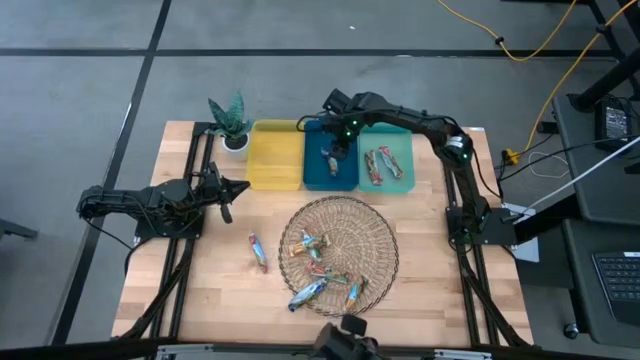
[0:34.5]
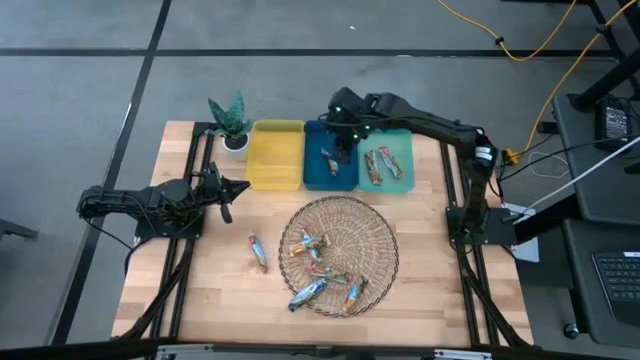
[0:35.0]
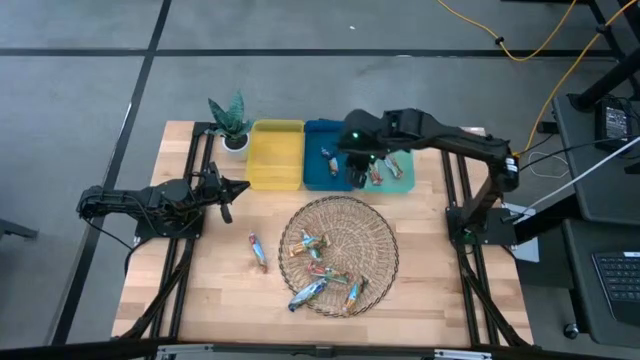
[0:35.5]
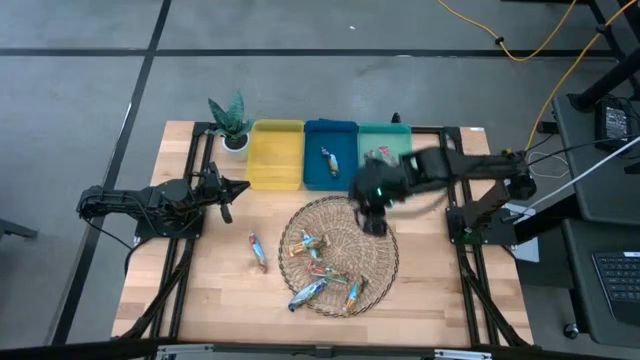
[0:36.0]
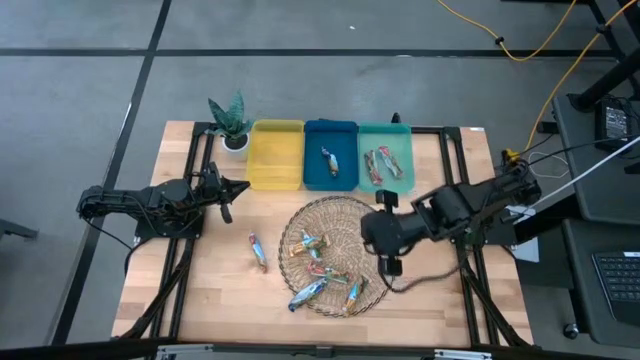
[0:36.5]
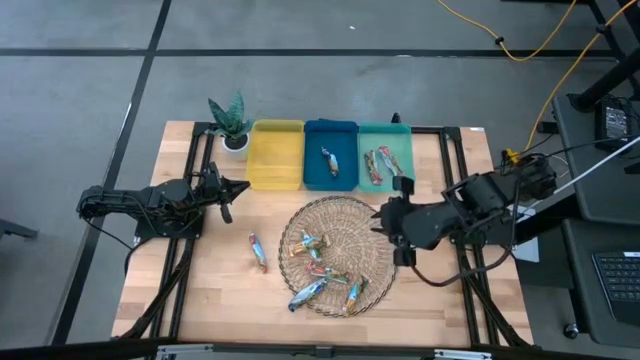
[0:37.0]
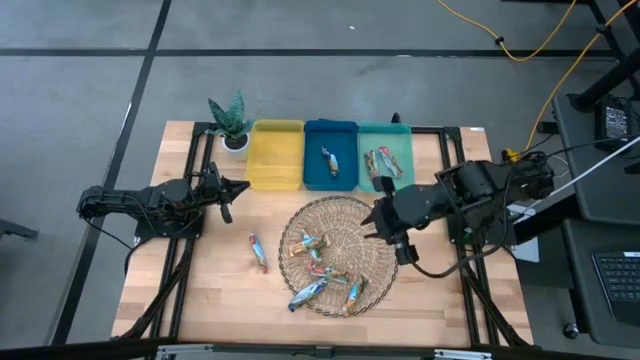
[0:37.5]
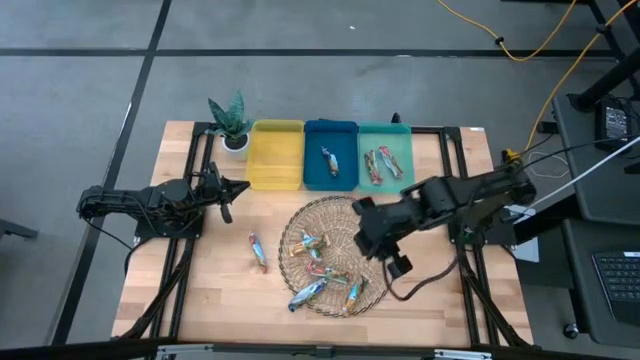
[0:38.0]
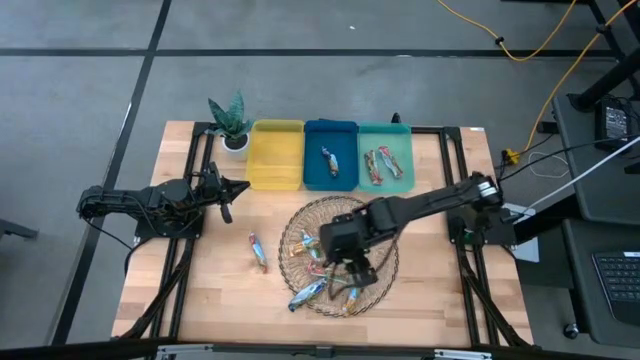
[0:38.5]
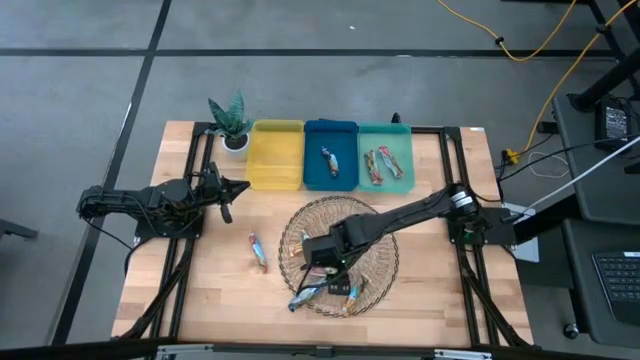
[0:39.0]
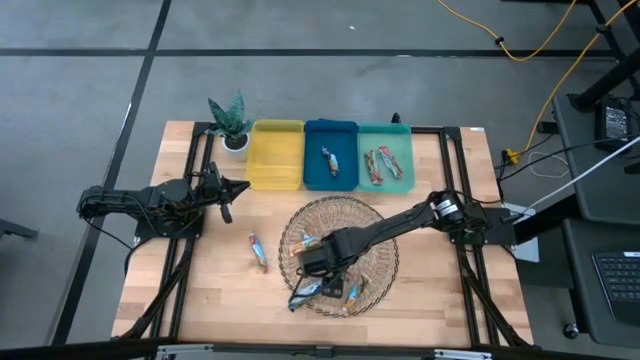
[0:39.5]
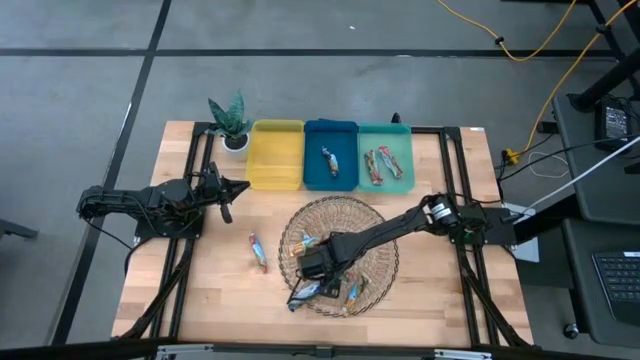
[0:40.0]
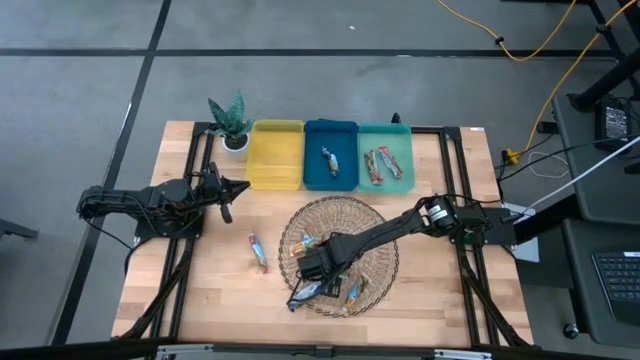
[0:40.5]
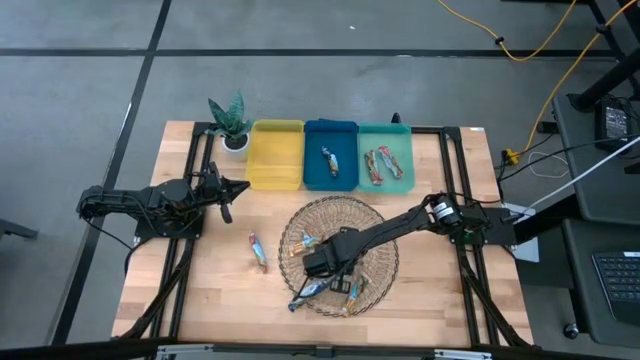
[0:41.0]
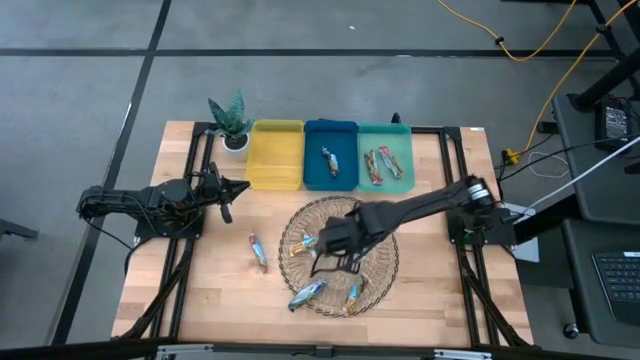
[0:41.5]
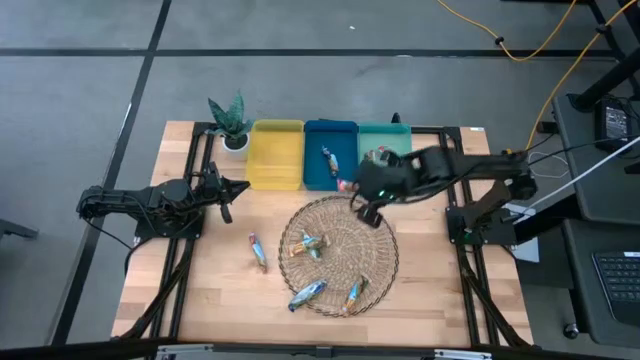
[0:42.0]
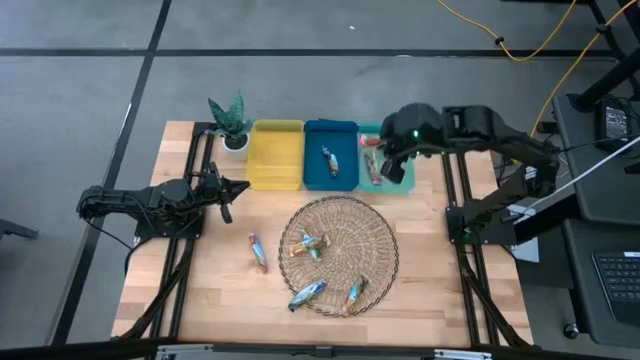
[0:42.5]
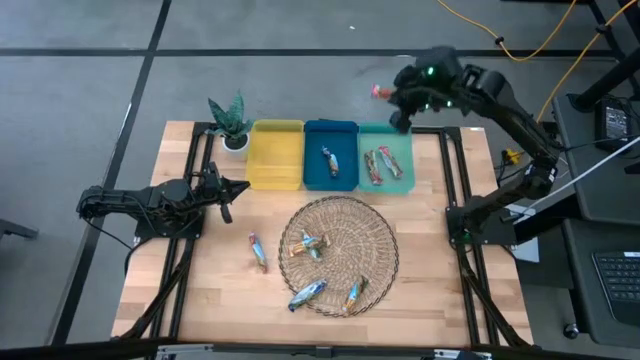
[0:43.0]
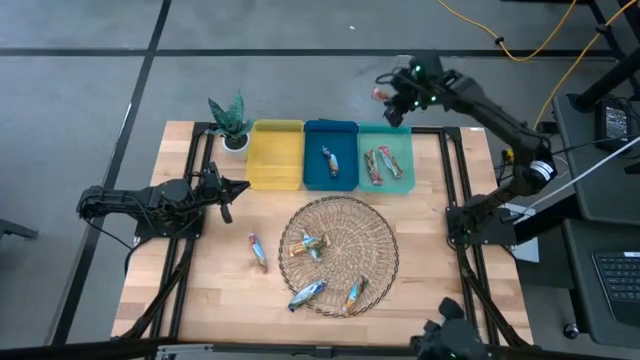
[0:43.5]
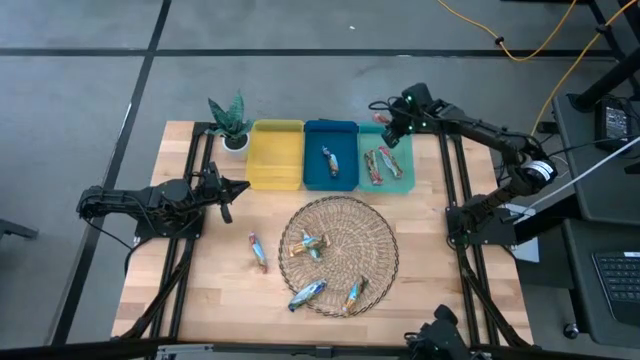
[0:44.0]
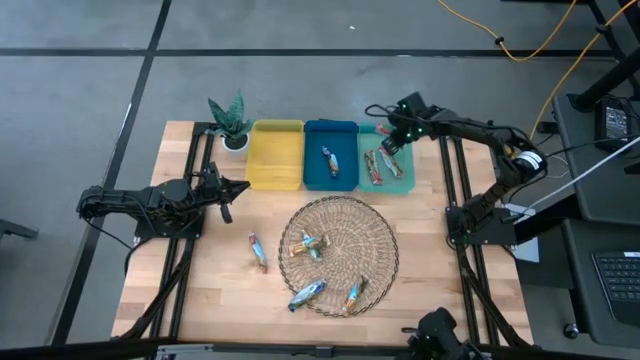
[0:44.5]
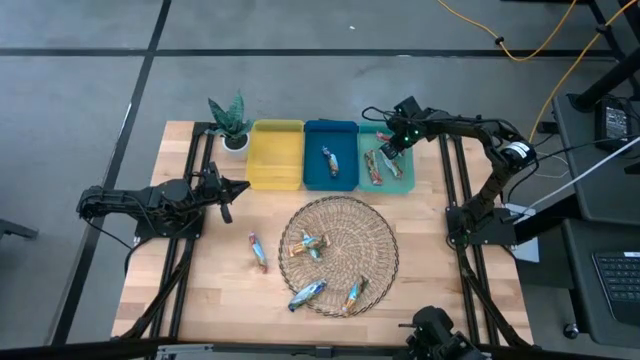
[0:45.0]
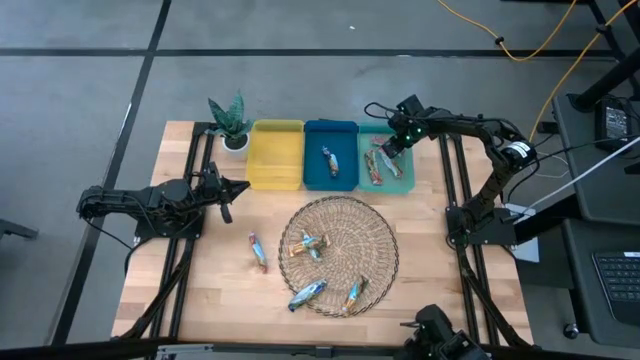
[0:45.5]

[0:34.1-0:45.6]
Task: Pick and place Granola Bars by type
Put the red granola bar into the green bin

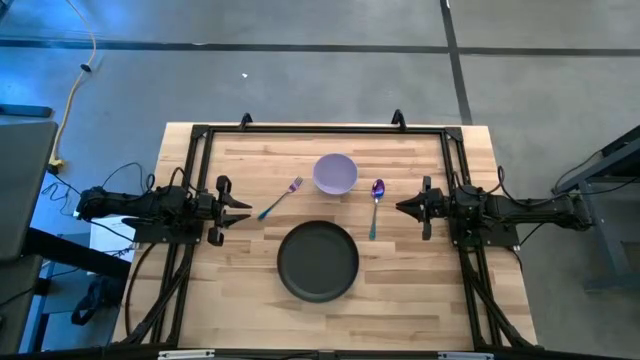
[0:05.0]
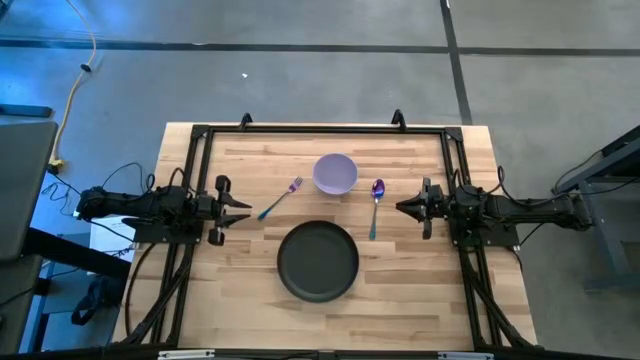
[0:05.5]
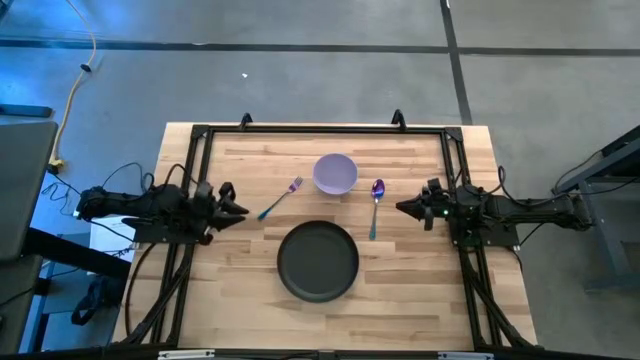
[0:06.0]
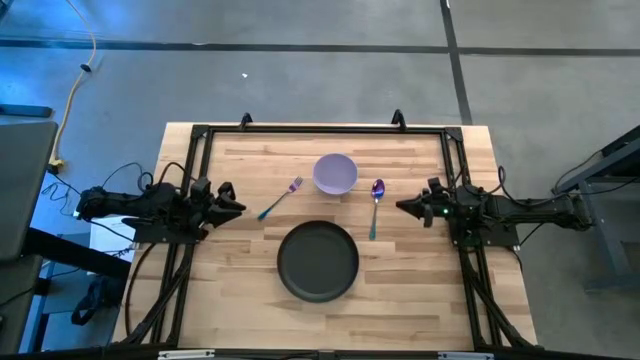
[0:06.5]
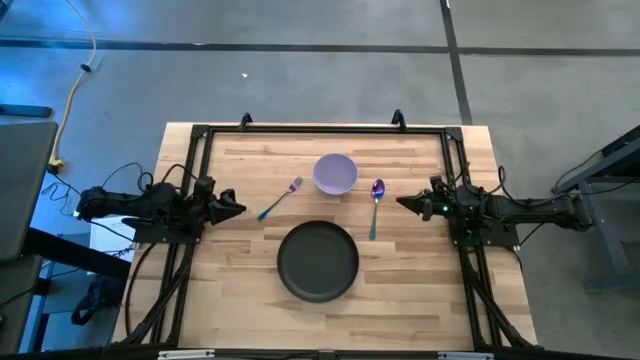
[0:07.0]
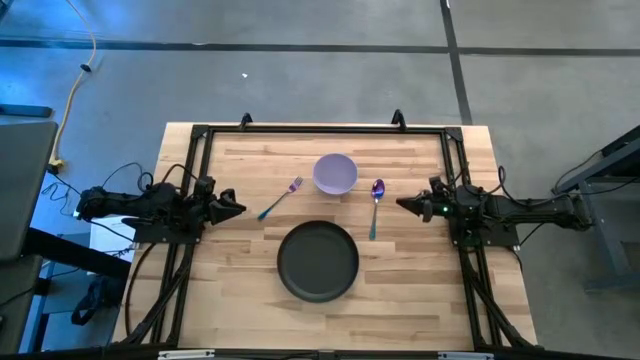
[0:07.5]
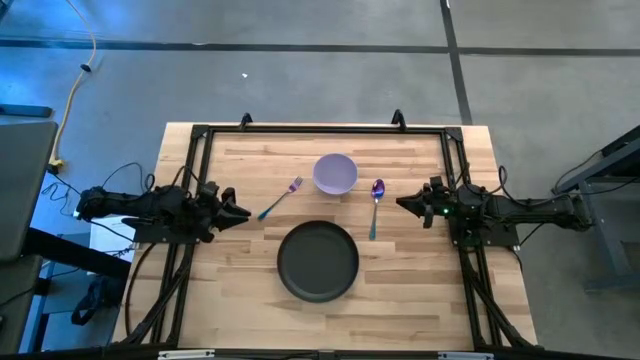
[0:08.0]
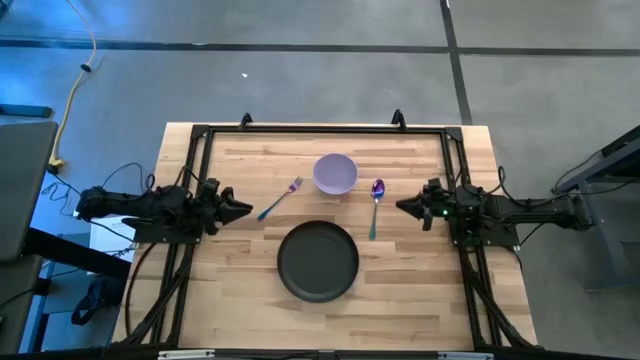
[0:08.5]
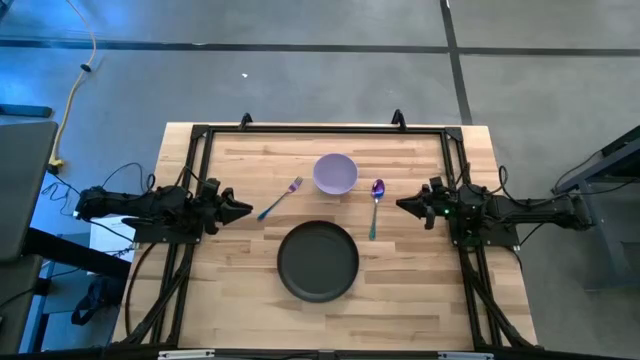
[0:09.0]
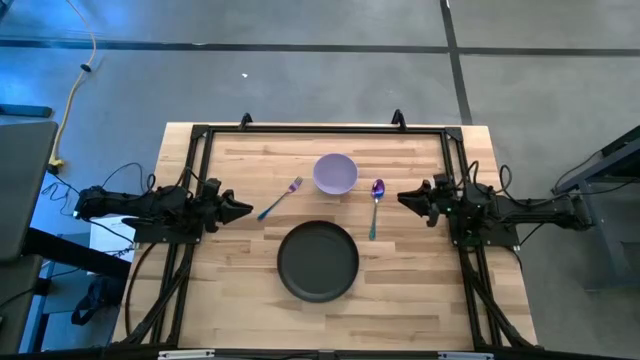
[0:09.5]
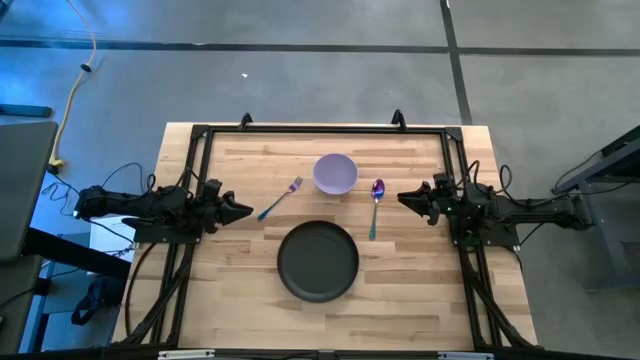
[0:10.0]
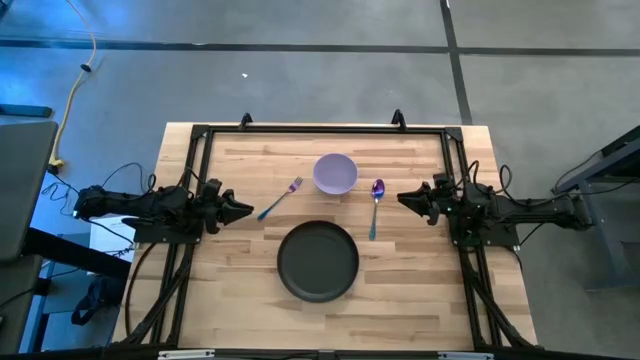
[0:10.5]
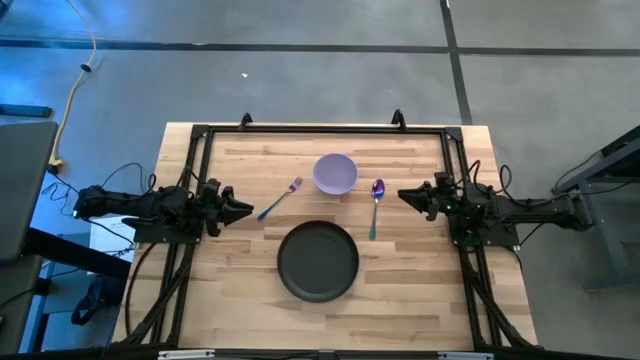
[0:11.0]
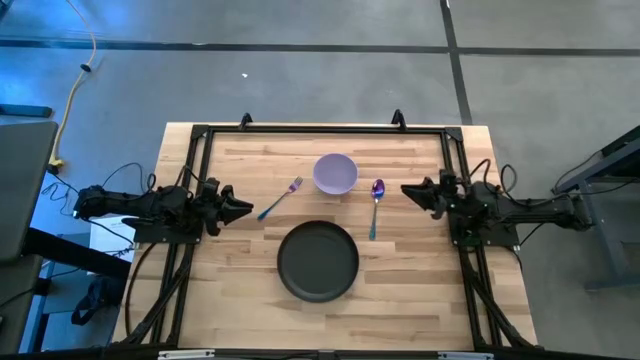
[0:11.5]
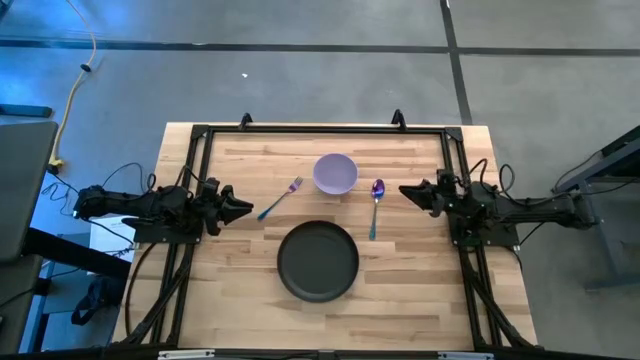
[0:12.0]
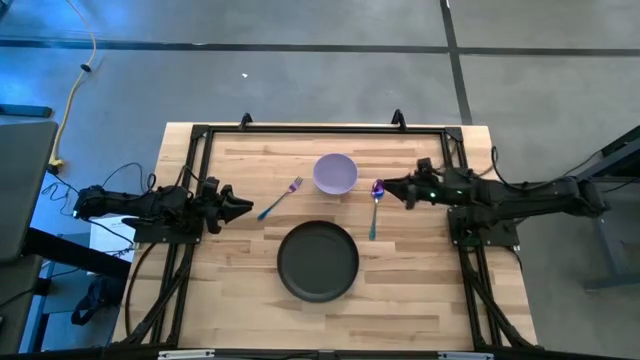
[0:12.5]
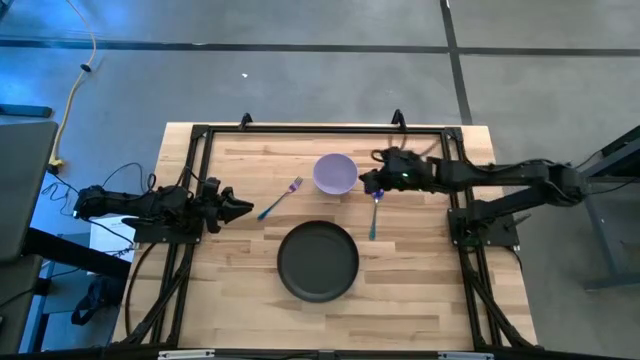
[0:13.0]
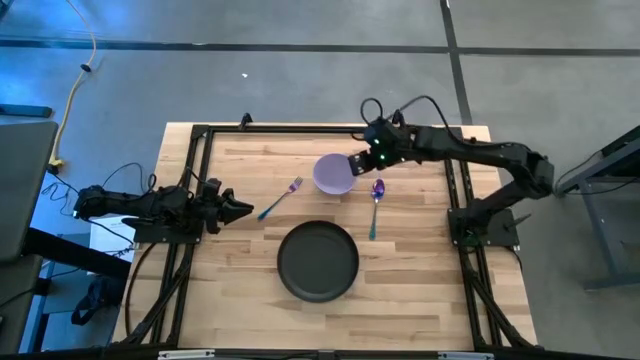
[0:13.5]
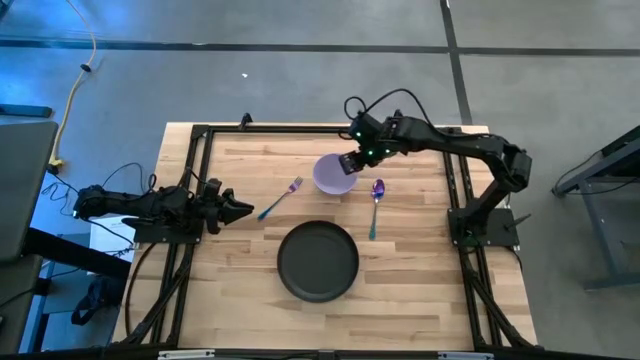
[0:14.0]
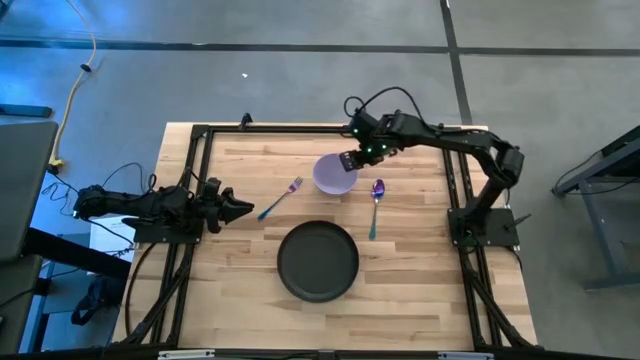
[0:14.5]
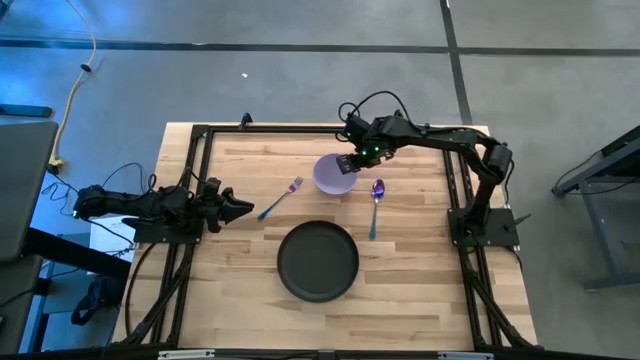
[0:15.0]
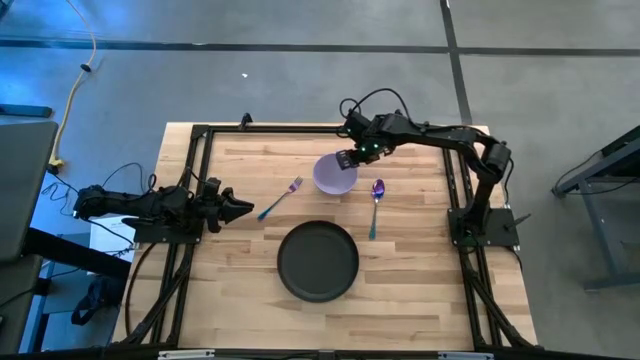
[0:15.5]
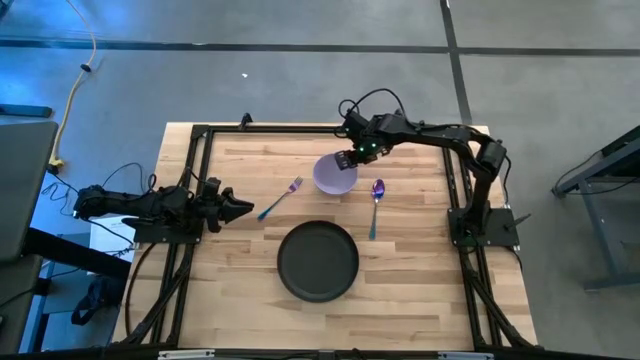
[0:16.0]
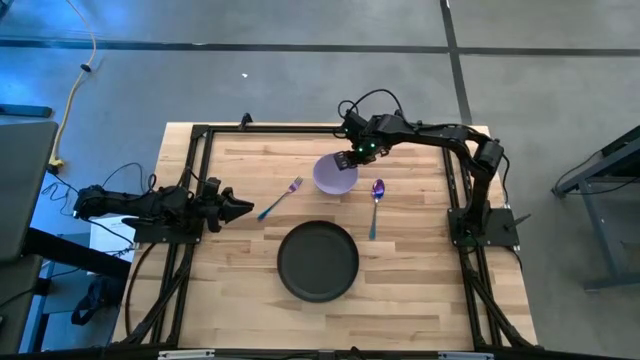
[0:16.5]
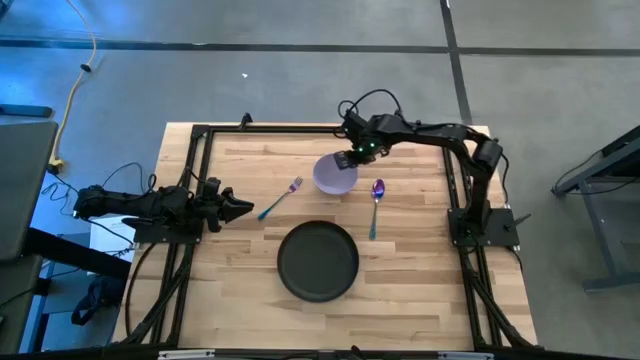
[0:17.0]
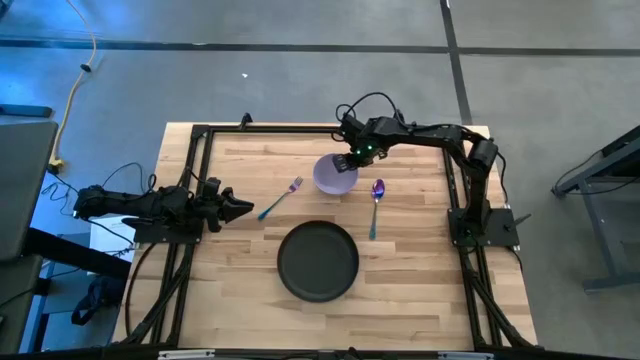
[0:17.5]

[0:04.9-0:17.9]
Task: Set table place
Put the violet bowl on the black plate
